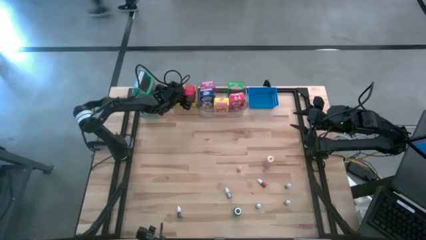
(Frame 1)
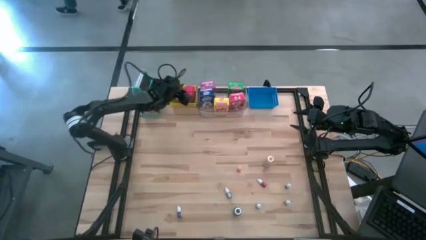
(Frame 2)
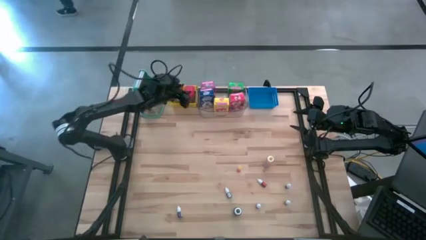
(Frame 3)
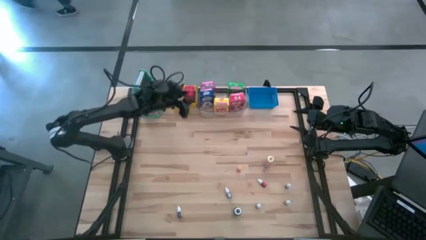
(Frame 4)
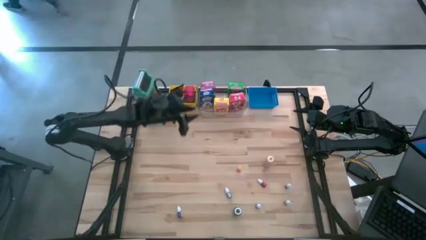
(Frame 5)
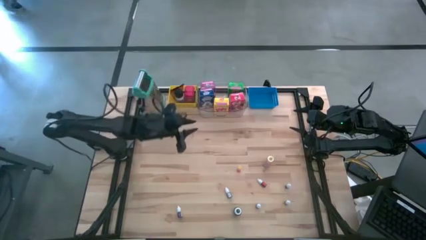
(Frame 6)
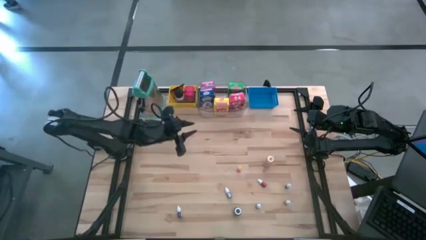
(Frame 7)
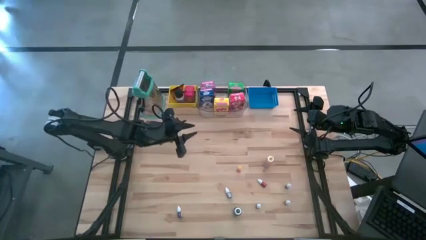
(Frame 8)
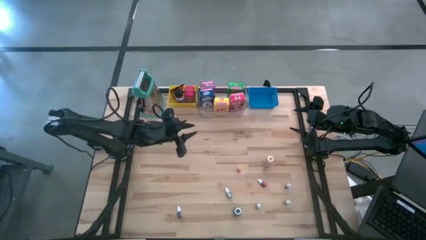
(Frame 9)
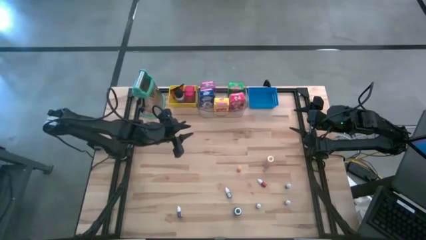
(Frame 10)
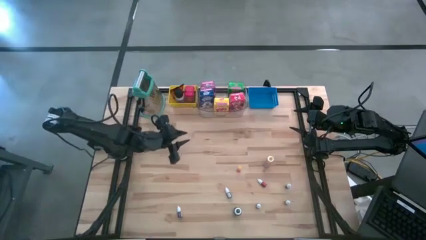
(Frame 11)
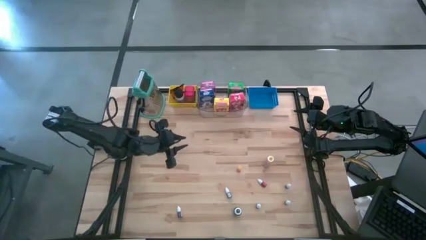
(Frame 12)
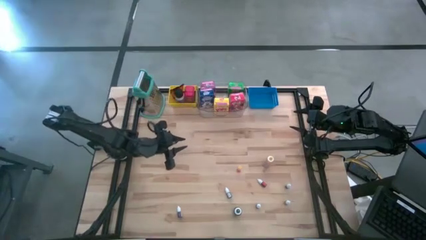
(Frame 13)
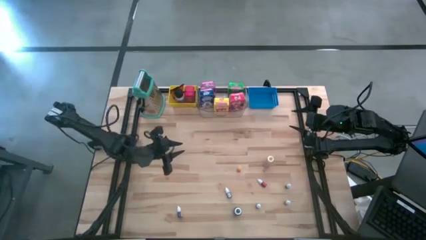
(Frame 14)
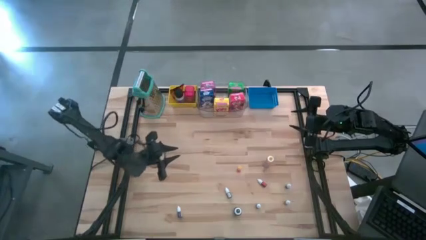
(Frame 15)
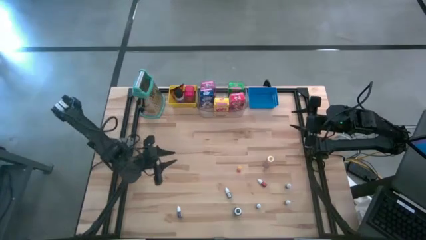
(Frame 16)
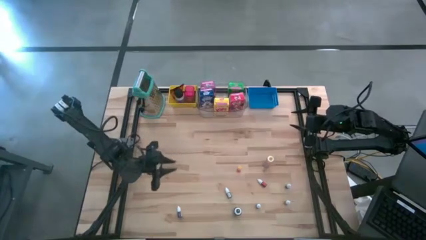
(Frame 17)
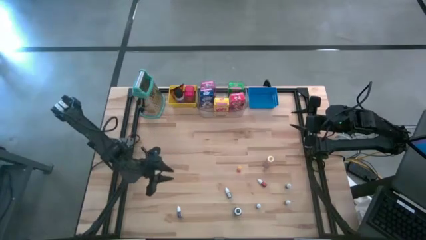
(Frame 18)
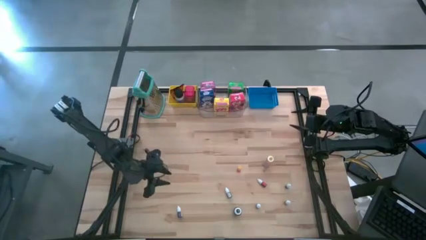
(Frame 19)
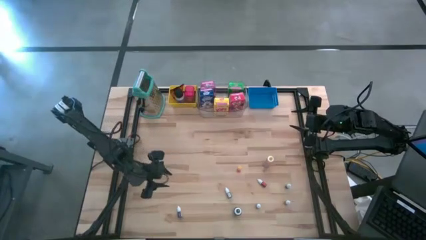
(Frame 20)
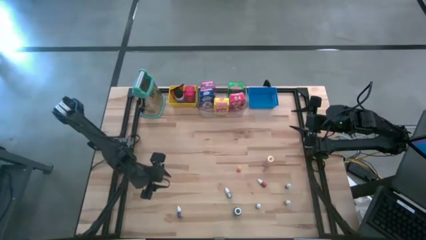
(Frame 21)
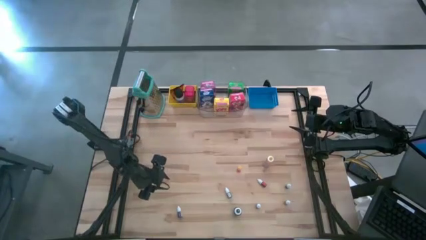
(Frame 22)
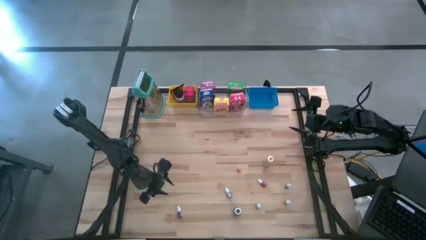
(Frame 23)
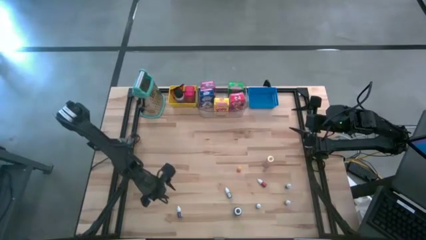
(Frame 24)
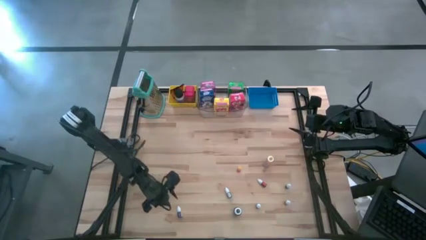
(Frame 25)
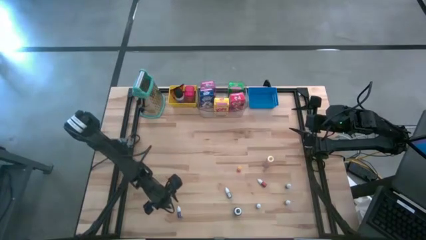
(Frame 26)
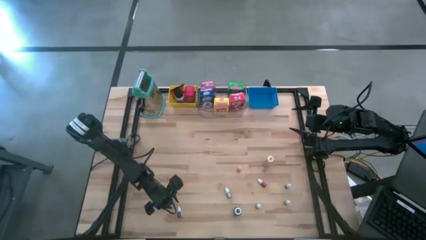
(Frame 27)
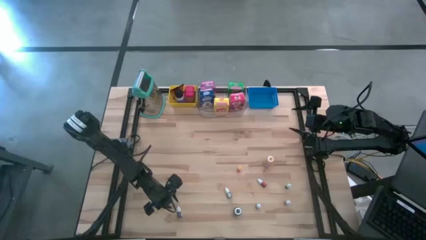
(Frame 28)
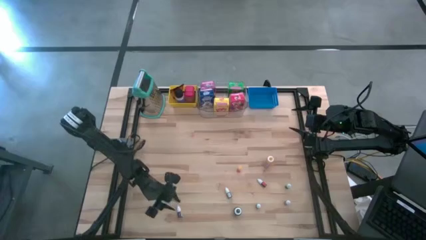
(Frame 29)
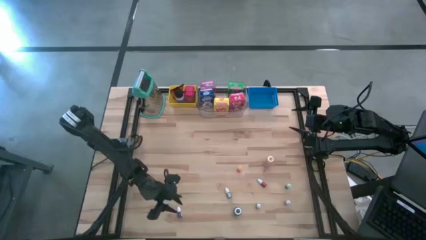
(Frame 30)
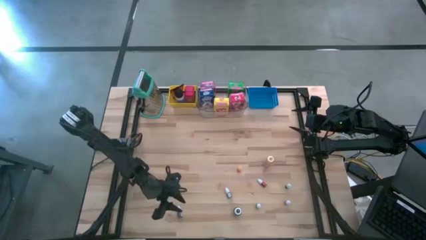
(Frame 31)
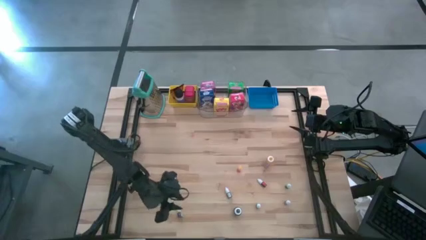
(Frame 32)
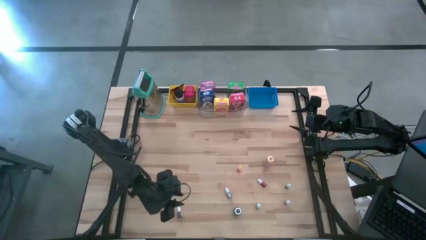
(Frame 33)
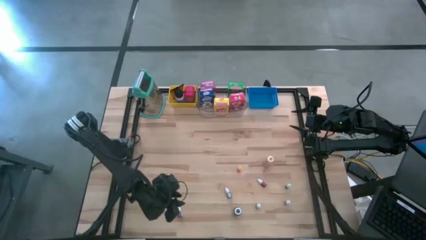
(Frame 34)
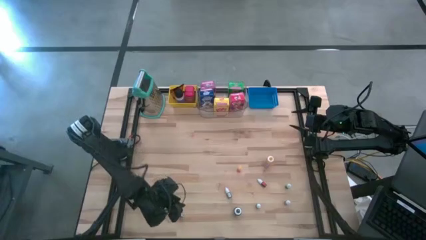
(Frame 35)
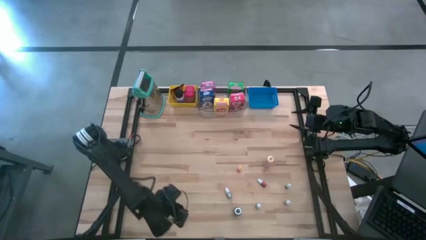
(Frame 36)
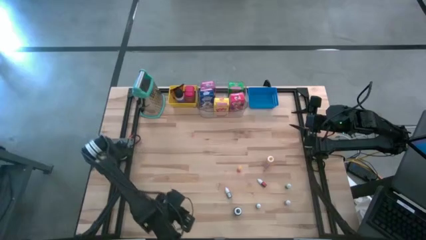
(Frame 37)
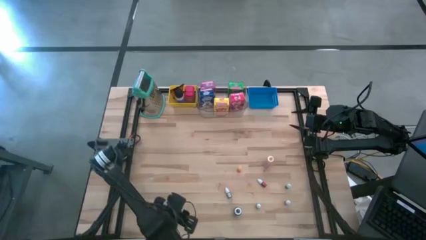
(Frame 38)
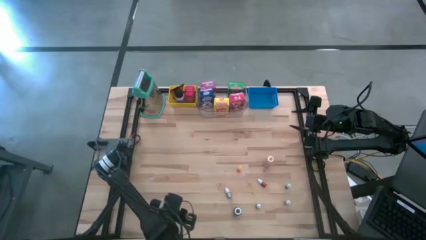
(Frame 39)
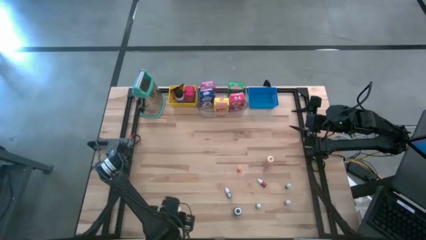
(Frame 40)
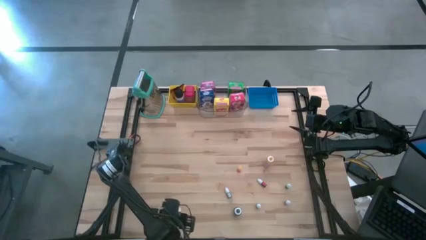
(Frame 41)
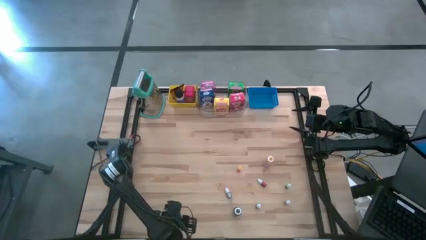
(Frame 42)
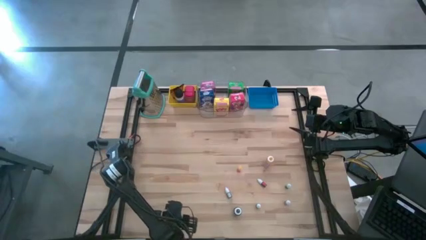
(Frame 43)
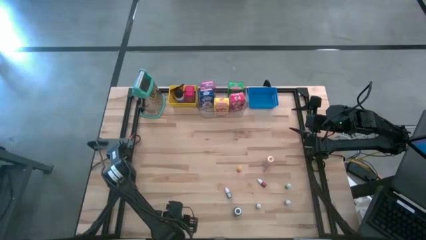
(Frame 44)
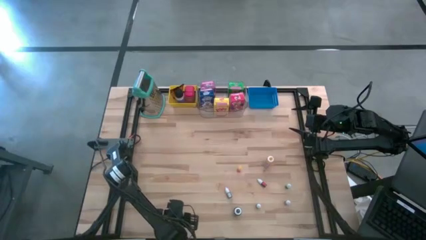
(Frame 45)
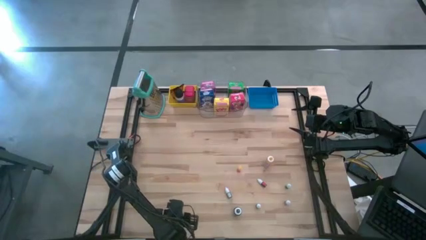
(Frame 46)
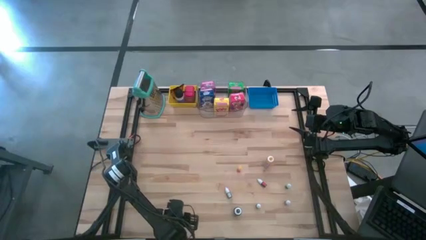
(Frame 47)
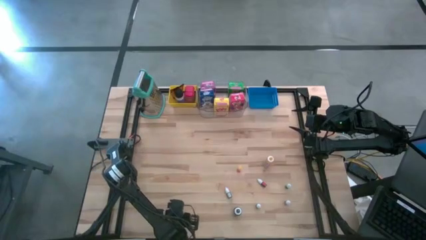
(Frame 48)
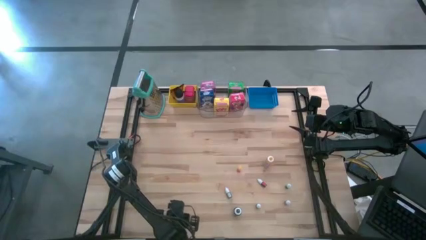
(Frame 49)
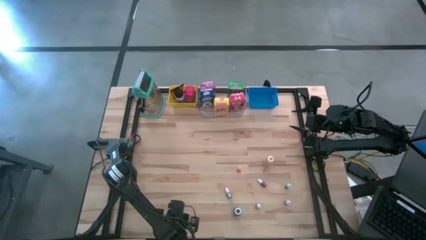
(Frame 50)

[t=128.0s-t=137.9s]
Task: Pick & Place Kitchen Items
Put the left purple bottle into the blue bin
